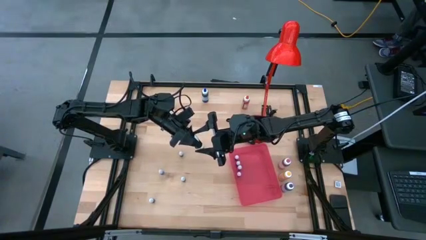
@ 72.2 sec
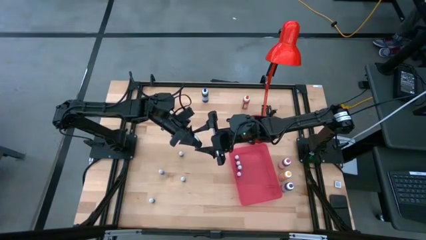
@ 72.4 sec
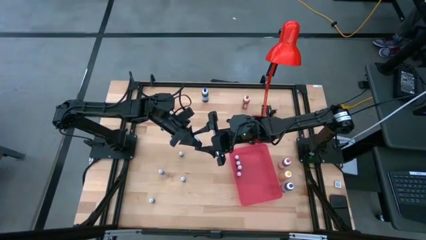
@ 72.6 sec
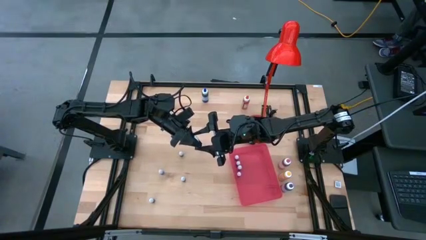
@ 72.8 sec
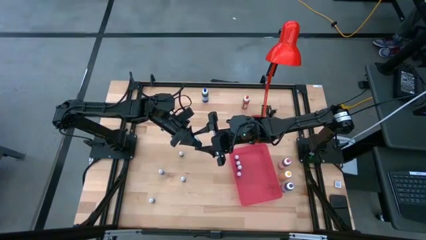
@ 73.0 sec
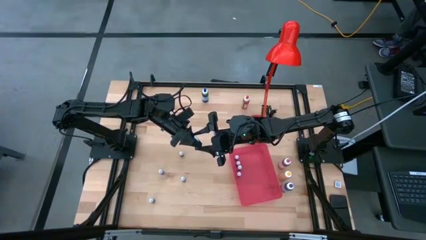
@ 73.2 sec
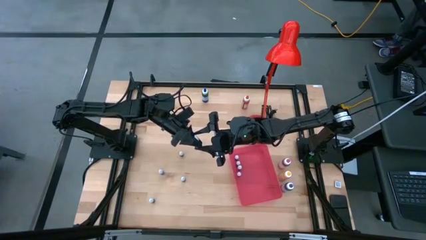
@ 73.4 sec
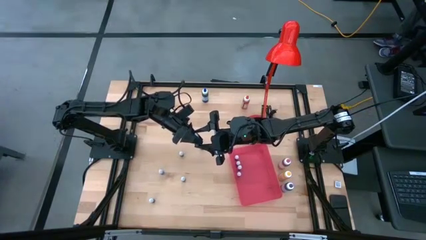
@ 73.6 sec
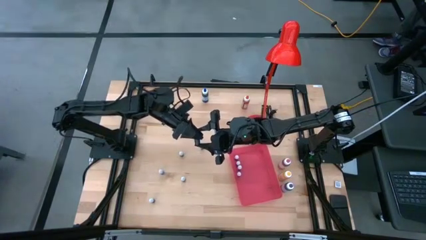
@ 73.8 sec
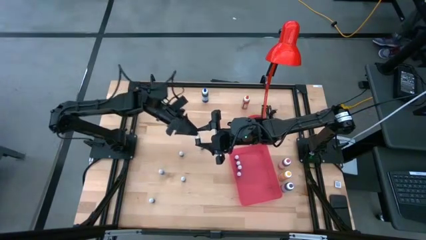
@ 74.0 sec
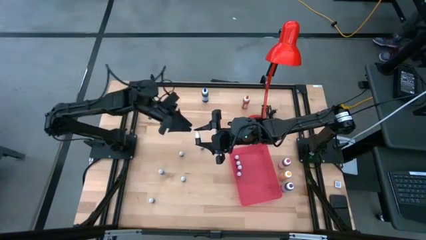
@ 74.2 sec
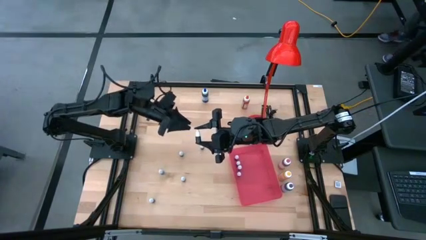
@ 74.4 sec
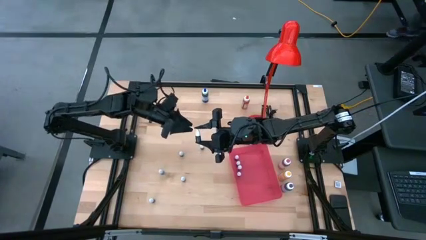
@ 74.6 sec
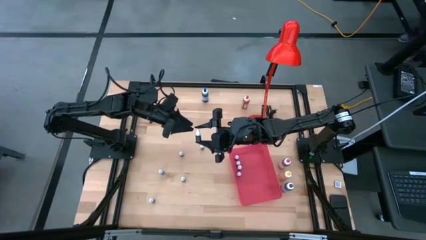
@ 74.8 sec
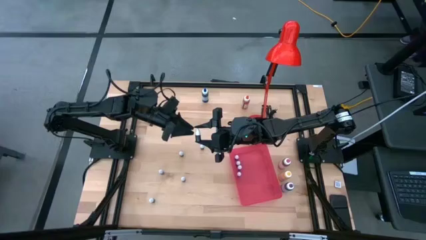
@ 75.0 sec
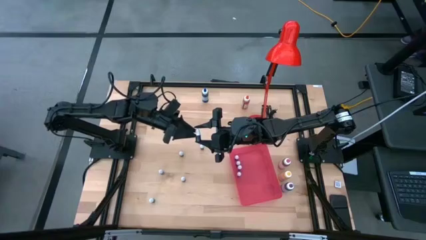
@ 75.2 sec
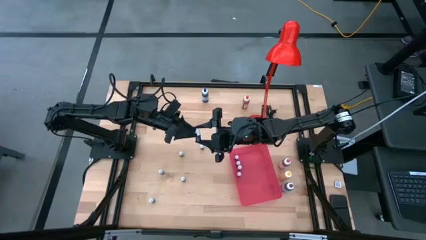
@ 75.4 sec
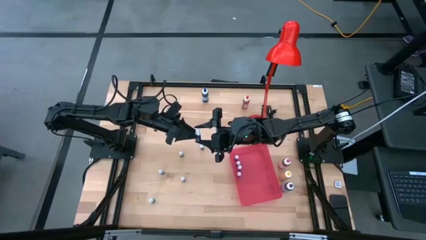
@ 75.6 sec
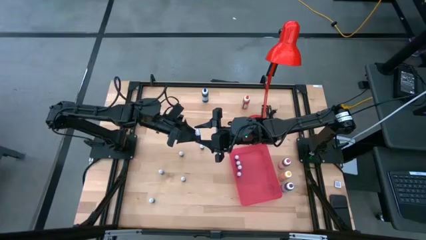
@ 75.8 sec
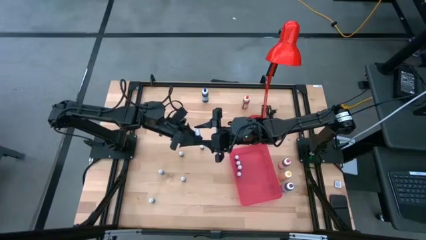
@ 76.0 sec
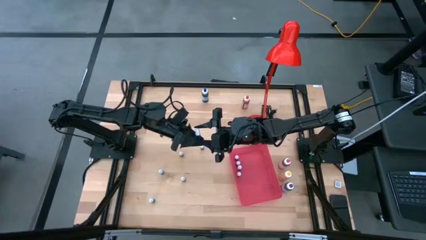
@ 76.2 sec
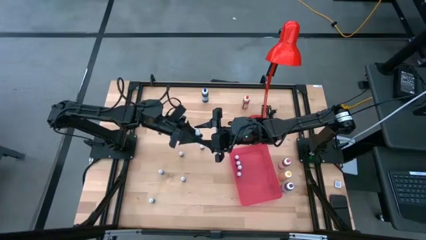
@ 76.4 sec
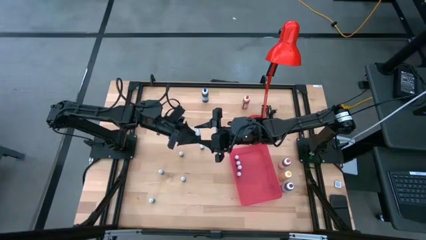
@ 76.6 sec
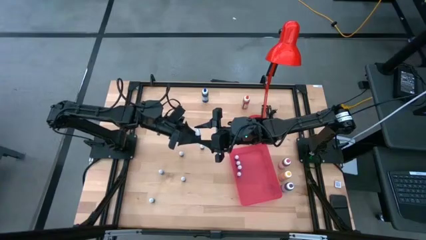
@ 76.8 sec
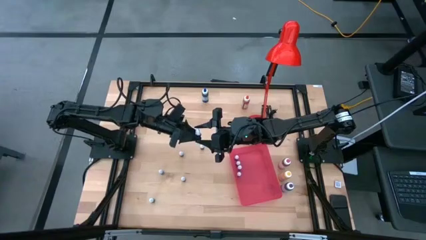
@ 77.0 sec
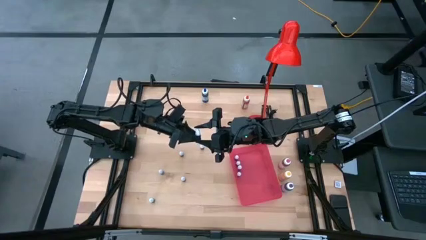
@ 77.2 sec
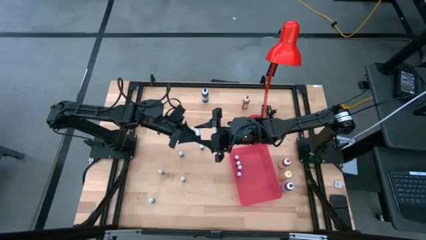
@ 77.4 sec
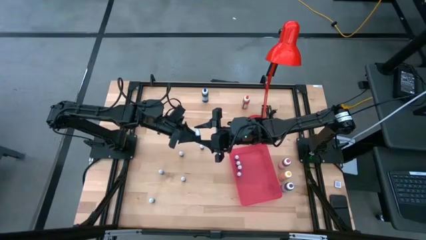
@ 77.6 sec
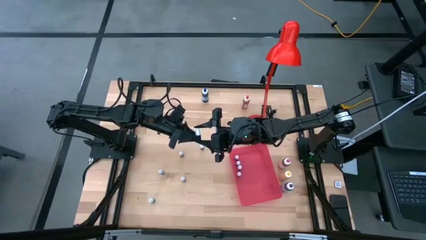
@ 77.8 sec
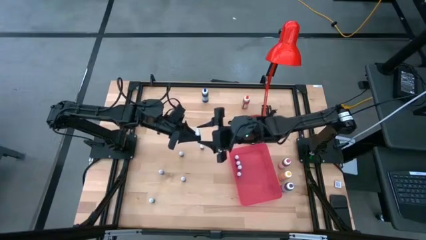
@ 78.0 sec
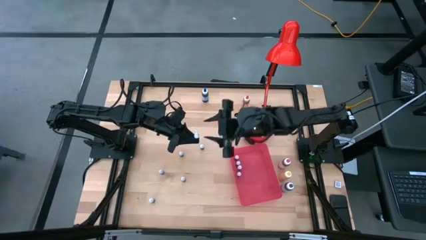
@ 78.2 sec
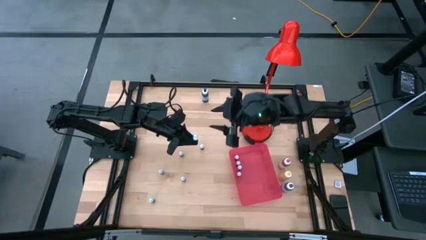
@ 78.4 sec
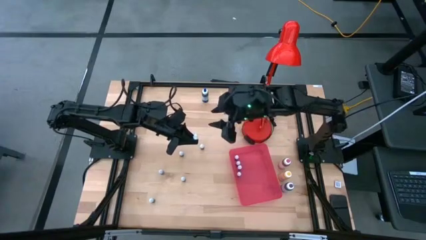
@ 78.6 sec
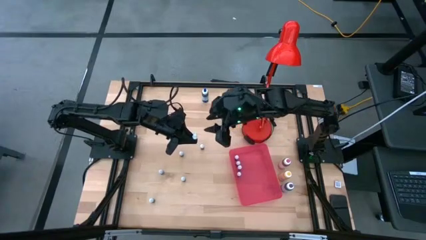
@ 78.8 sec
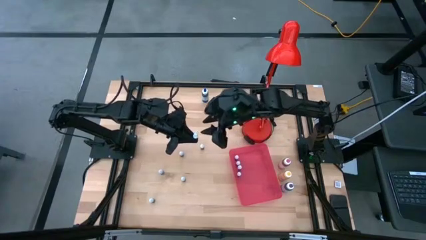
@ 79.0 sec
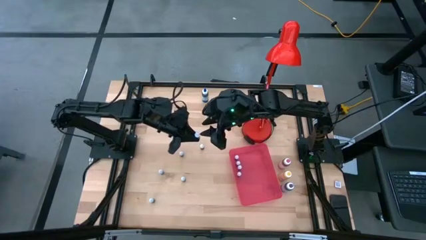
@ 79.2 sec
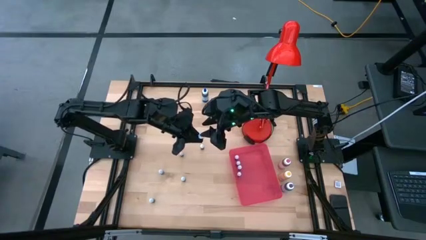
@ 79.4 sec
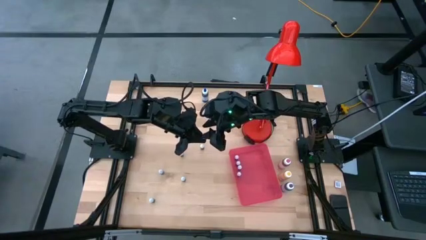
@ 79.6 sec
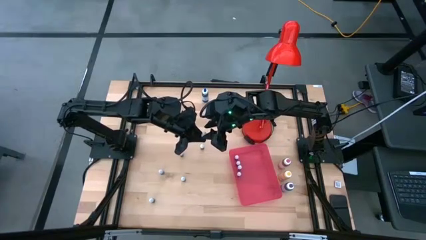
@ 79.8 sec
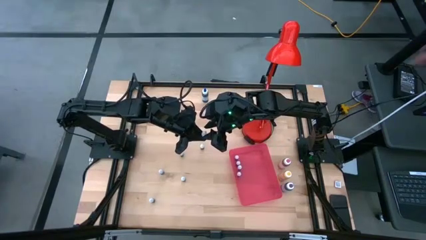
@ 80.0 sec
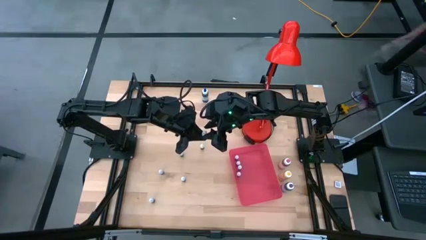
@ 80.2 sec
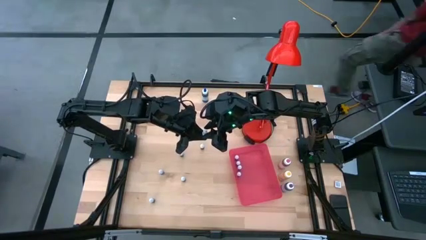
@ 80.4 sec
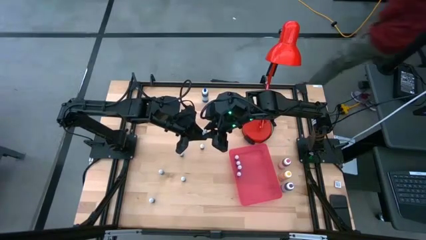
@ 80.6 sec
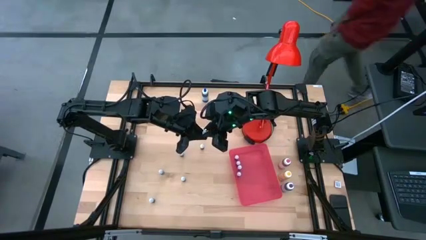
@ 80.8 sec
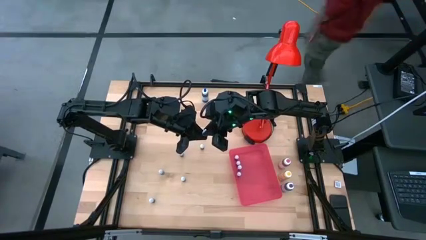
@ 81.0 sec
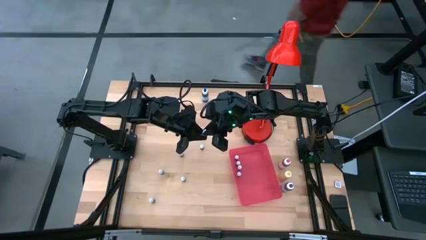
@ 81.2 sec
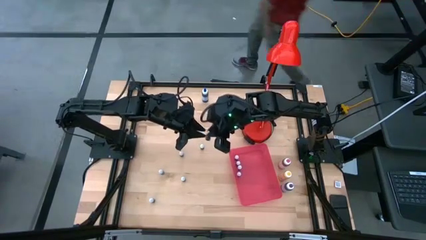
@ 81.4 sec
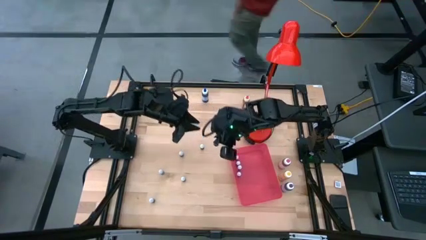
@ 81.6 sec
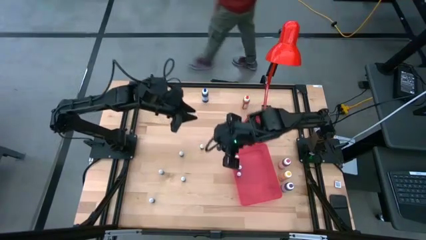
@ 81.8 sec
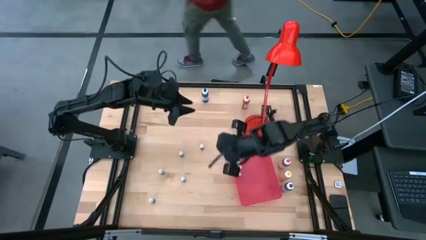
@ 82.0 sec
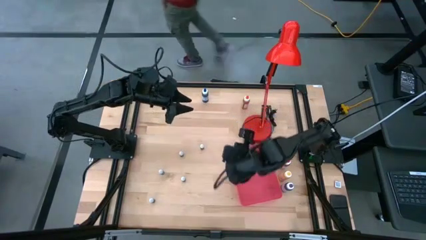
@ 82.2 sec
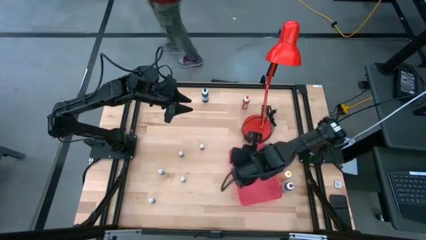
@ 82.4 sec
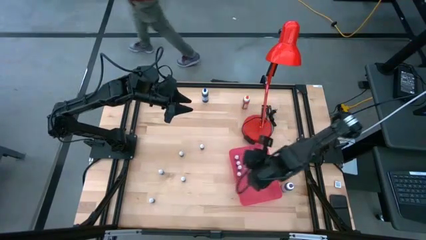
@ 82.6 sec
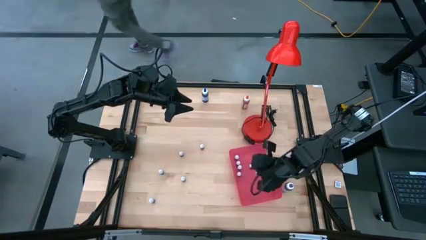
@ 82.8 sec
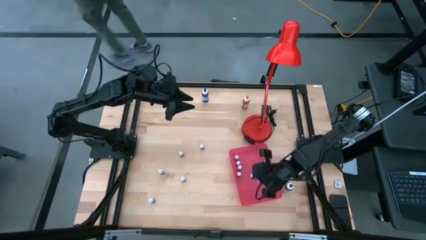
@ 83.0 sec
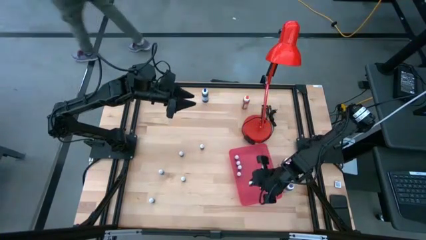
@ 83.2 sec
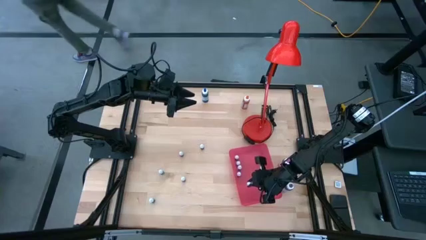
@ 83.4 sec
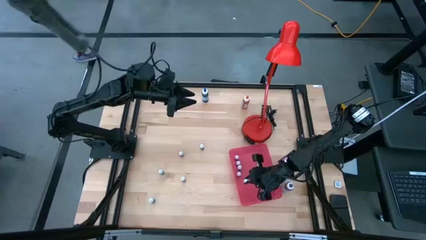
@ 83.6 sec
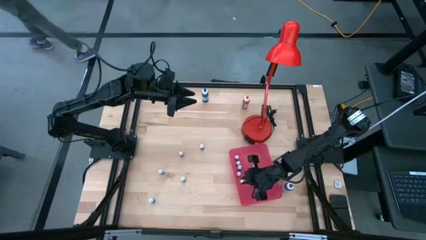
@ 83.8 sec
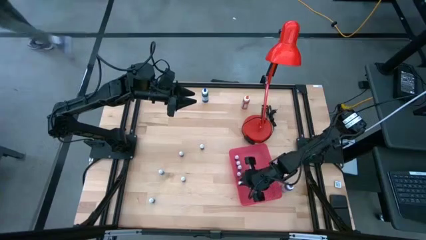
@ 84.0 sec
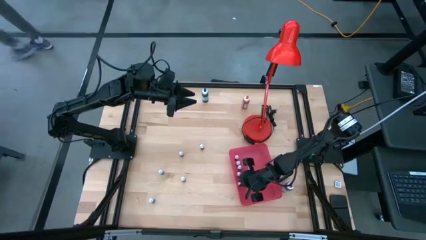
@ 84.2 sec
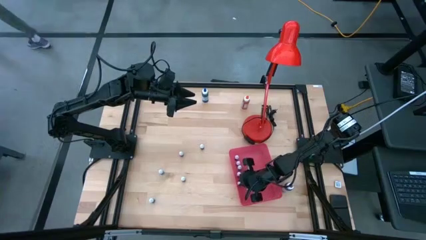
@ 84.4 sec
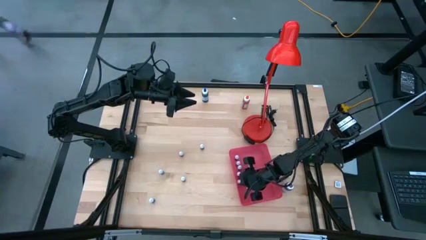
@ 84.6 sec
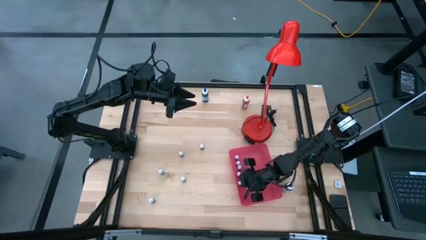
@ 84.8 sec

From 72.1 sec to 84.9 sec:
Task: Pick & Place food coloring
Put the small pink food coloring bottle into the red bin
